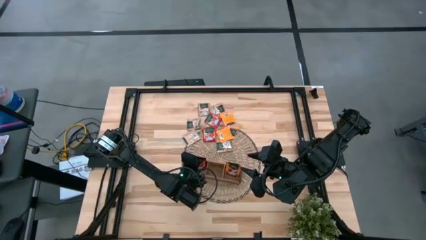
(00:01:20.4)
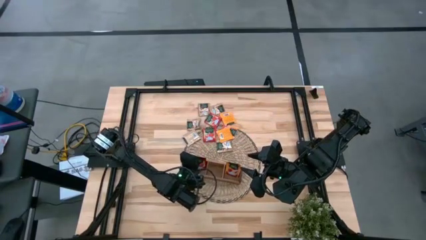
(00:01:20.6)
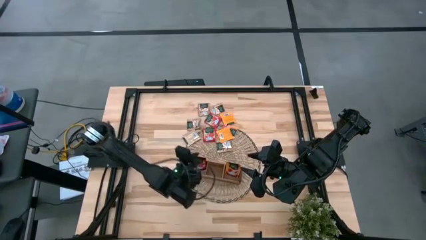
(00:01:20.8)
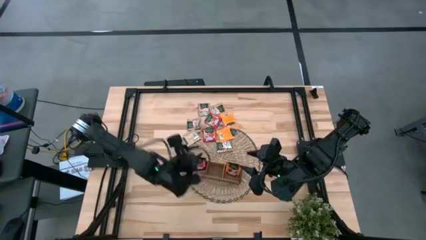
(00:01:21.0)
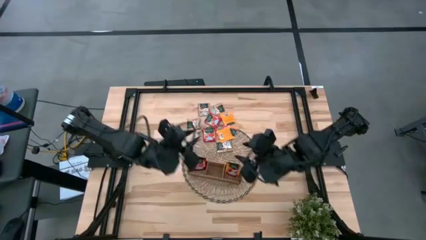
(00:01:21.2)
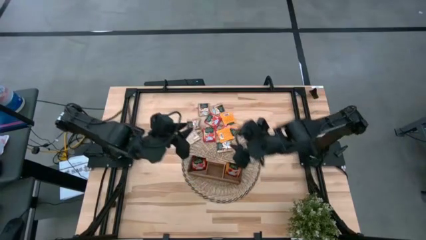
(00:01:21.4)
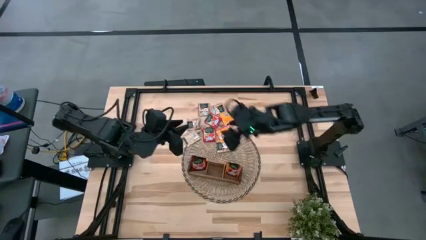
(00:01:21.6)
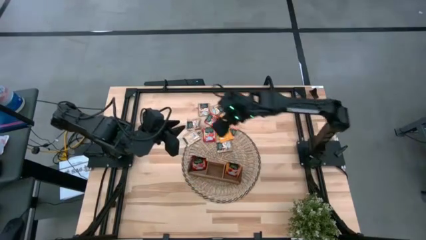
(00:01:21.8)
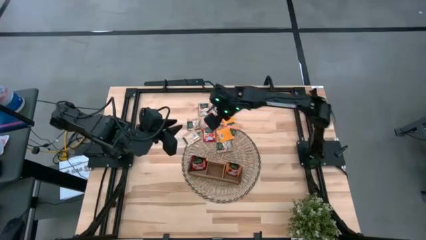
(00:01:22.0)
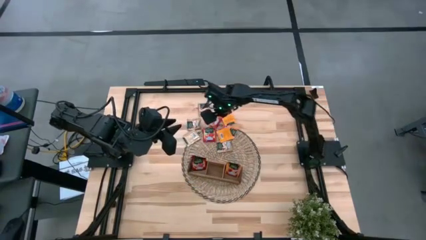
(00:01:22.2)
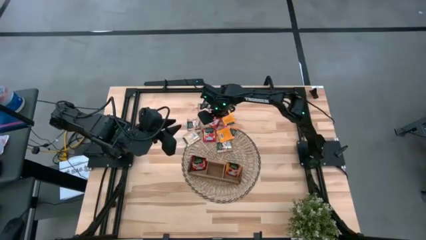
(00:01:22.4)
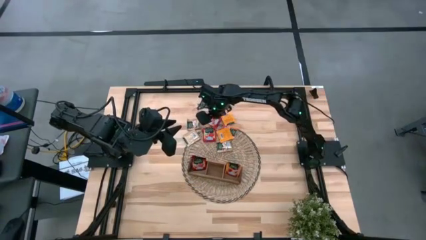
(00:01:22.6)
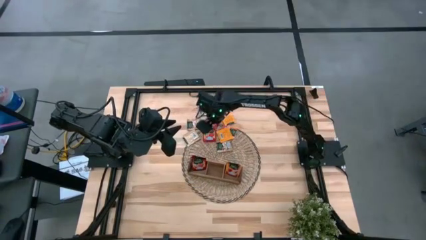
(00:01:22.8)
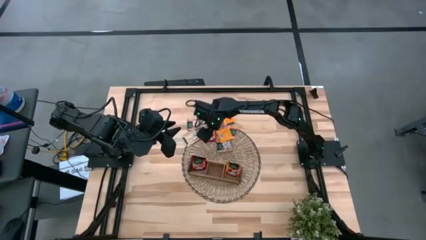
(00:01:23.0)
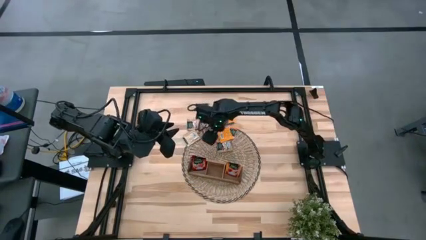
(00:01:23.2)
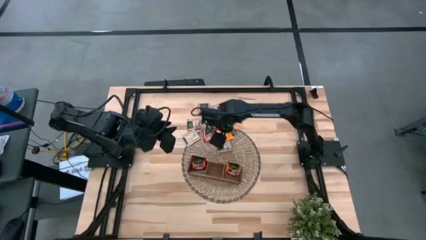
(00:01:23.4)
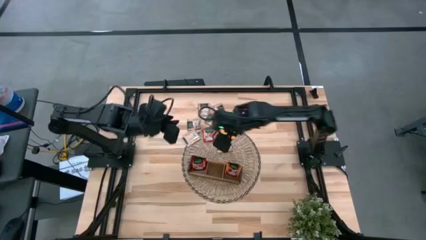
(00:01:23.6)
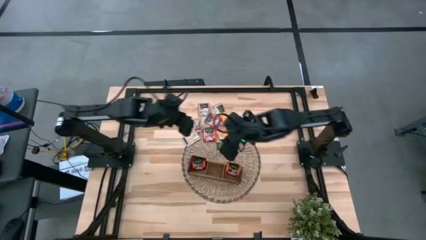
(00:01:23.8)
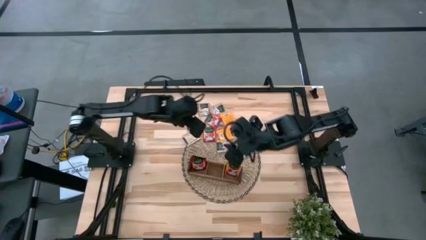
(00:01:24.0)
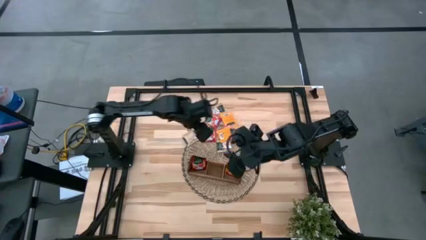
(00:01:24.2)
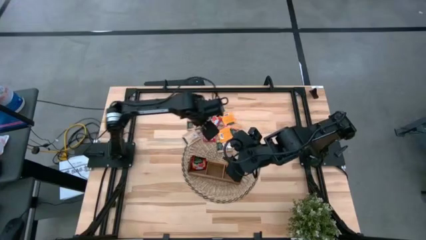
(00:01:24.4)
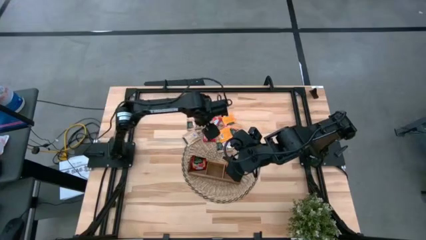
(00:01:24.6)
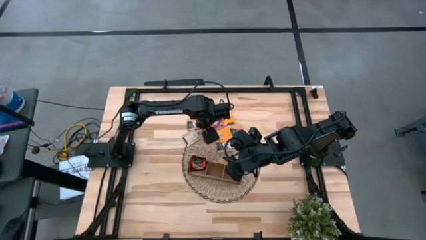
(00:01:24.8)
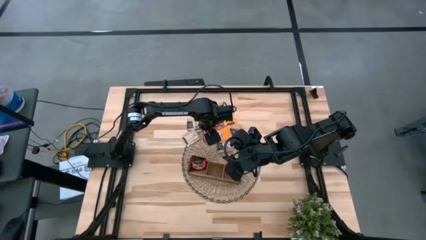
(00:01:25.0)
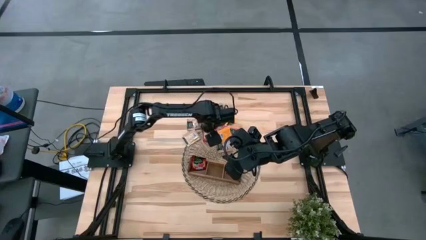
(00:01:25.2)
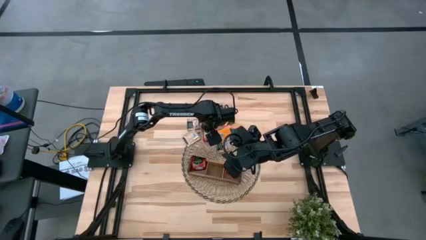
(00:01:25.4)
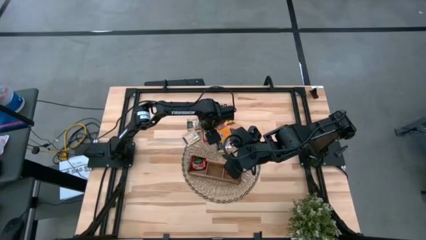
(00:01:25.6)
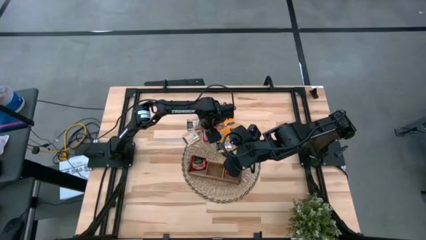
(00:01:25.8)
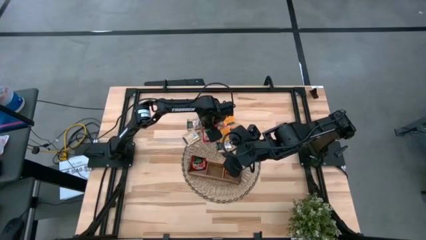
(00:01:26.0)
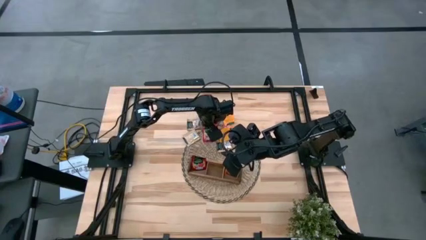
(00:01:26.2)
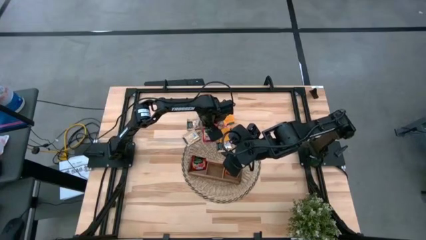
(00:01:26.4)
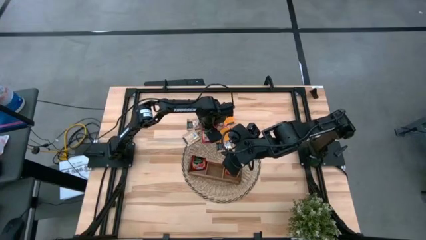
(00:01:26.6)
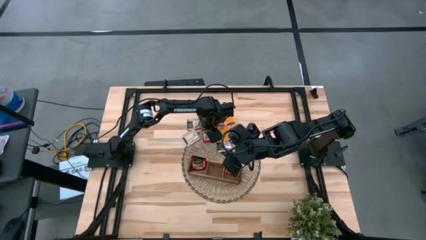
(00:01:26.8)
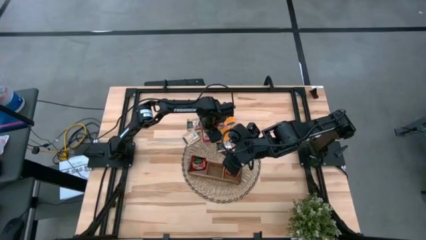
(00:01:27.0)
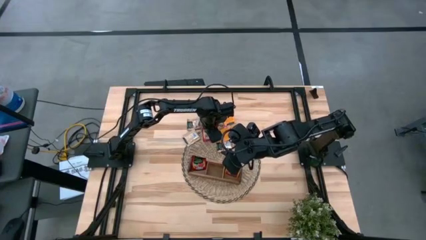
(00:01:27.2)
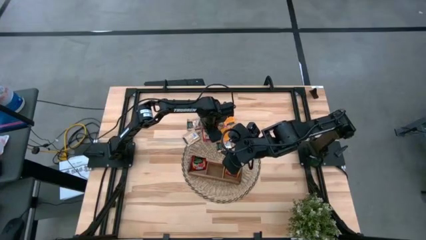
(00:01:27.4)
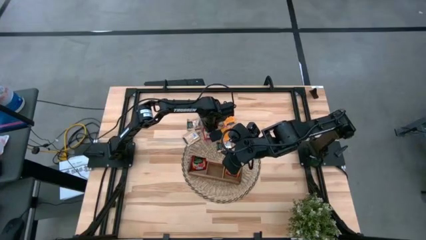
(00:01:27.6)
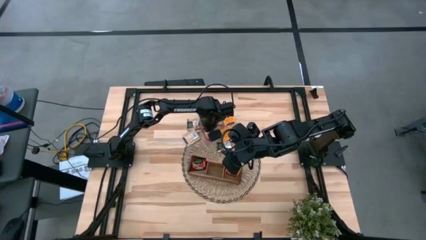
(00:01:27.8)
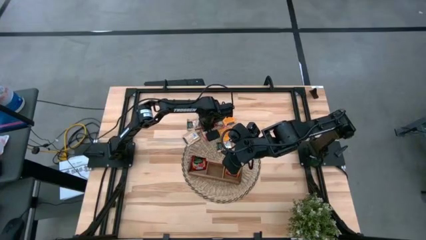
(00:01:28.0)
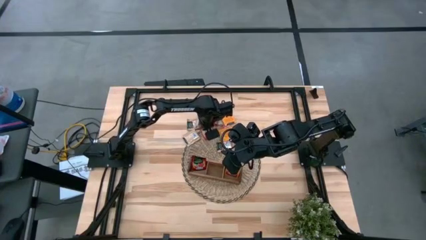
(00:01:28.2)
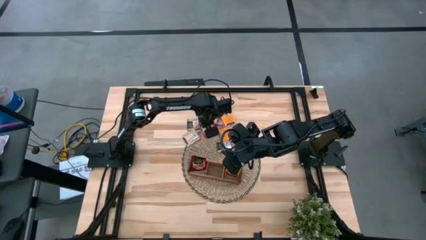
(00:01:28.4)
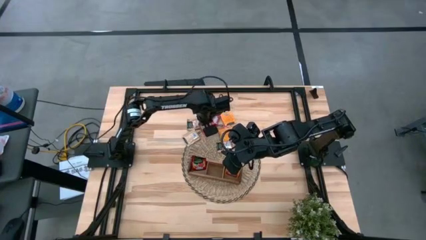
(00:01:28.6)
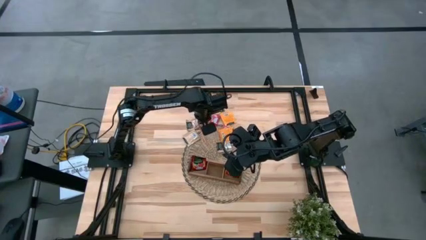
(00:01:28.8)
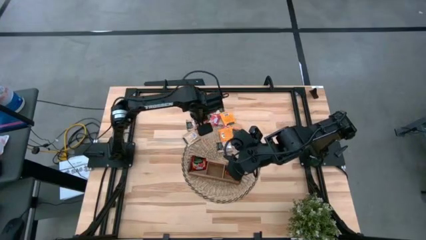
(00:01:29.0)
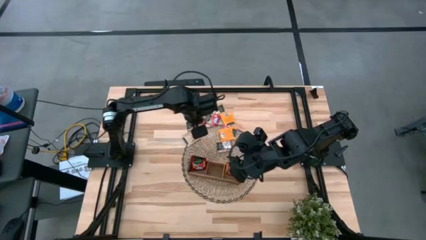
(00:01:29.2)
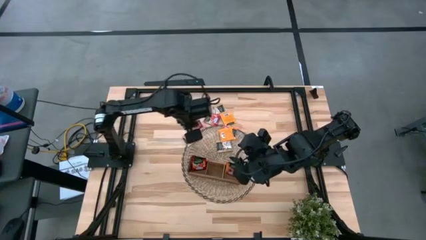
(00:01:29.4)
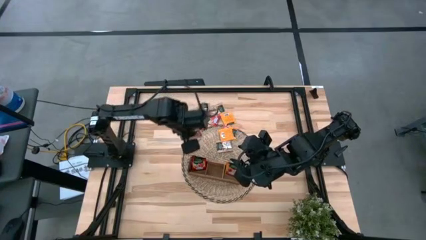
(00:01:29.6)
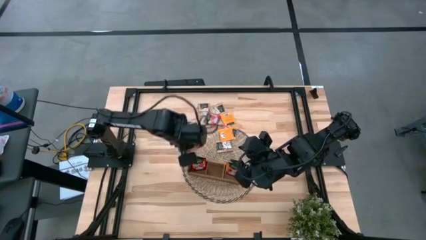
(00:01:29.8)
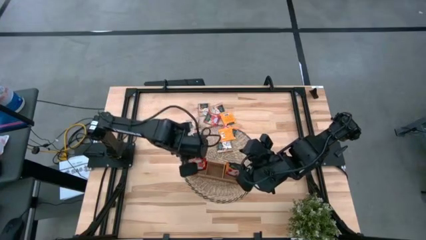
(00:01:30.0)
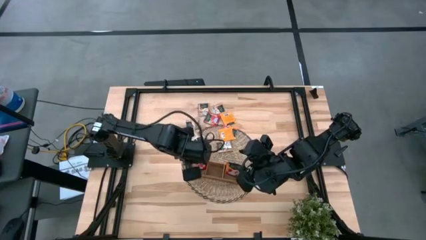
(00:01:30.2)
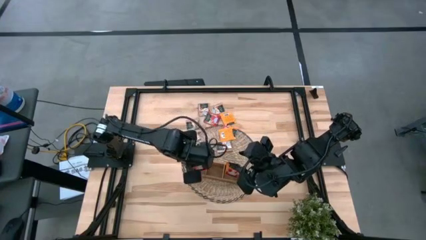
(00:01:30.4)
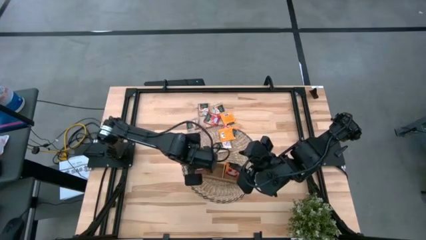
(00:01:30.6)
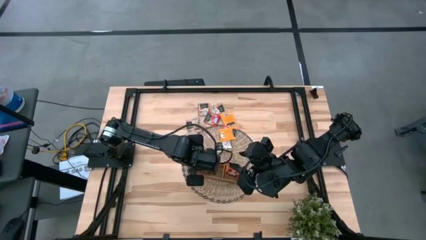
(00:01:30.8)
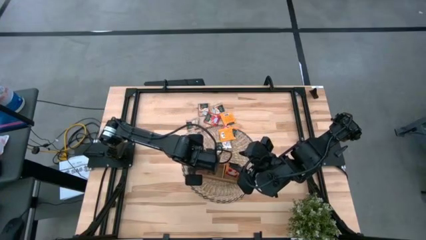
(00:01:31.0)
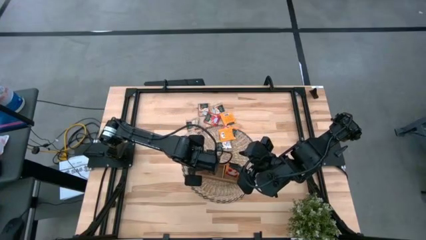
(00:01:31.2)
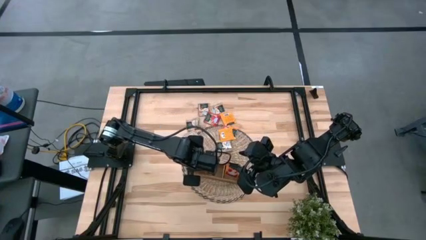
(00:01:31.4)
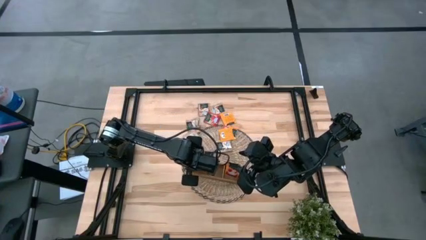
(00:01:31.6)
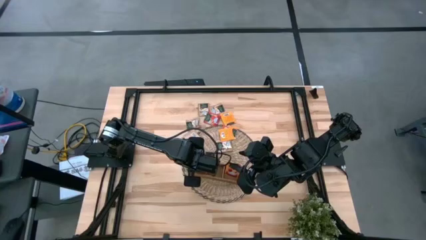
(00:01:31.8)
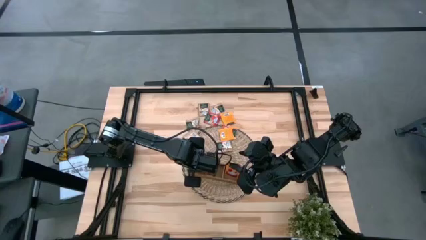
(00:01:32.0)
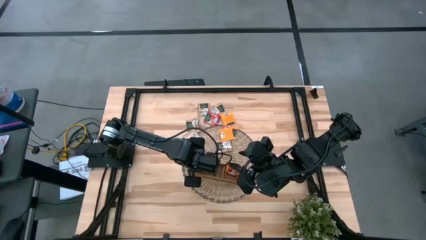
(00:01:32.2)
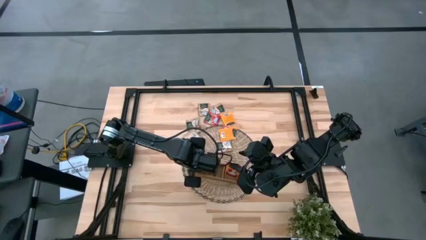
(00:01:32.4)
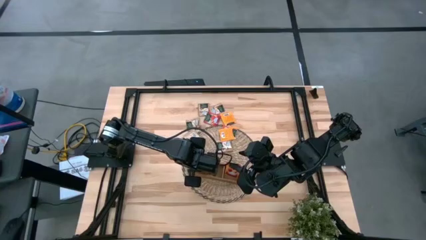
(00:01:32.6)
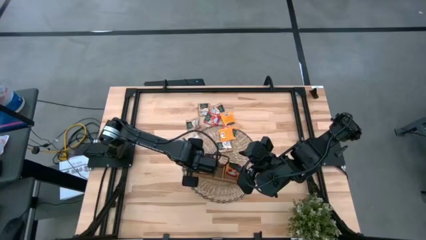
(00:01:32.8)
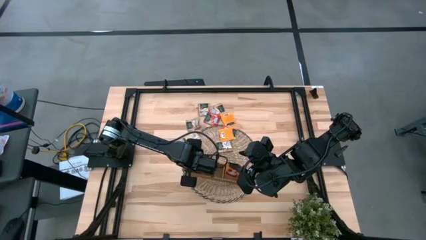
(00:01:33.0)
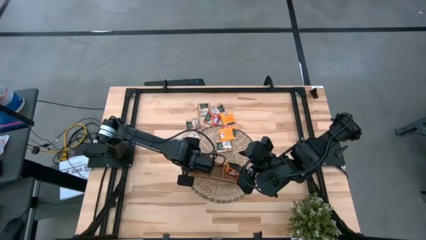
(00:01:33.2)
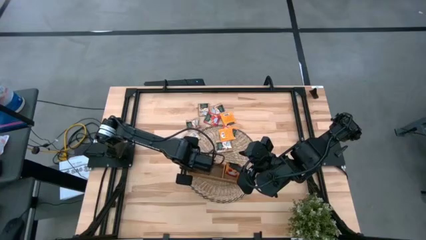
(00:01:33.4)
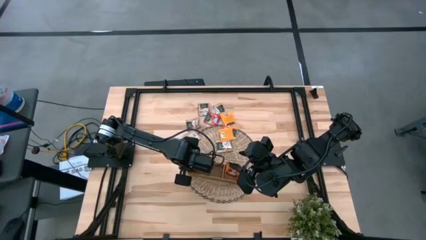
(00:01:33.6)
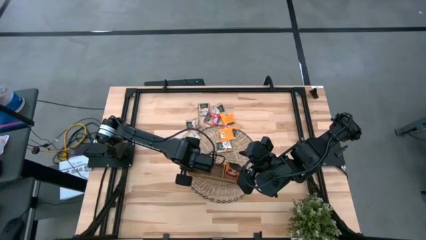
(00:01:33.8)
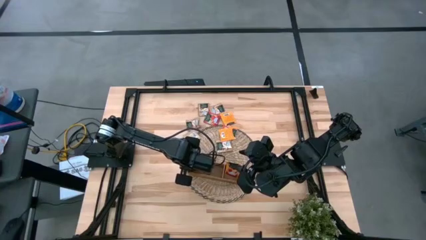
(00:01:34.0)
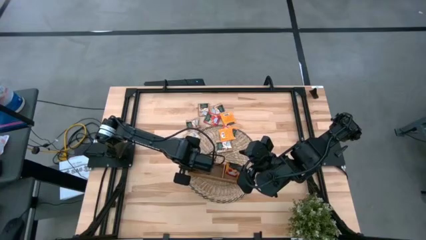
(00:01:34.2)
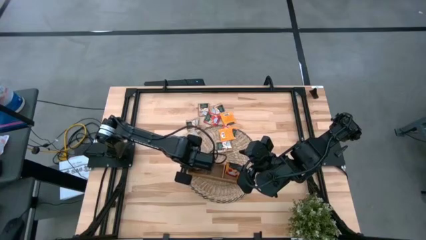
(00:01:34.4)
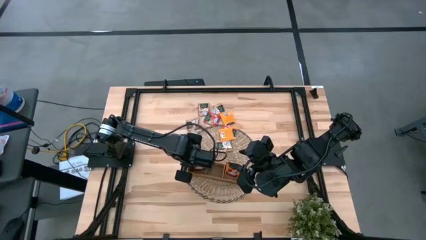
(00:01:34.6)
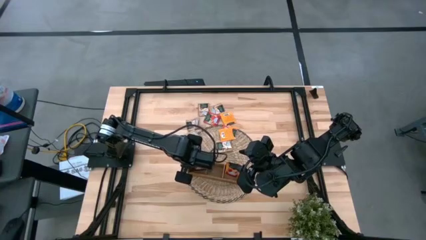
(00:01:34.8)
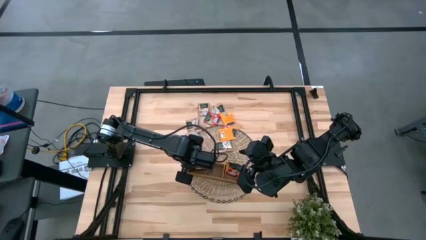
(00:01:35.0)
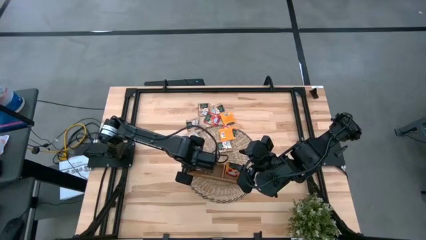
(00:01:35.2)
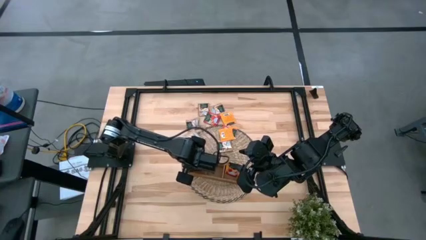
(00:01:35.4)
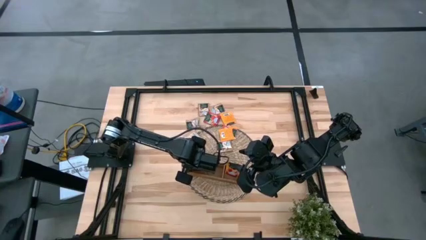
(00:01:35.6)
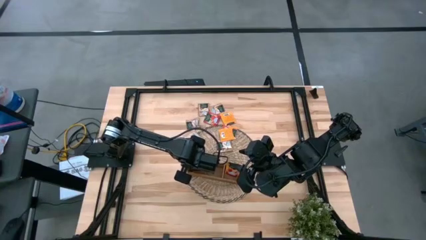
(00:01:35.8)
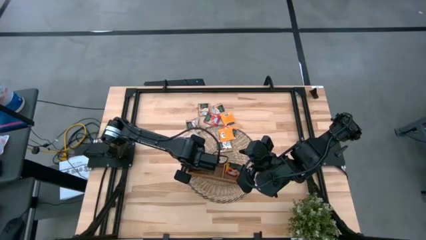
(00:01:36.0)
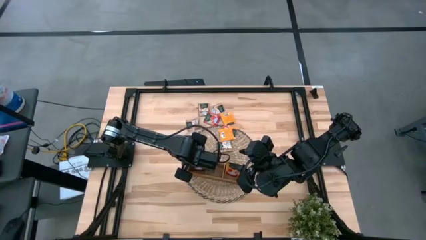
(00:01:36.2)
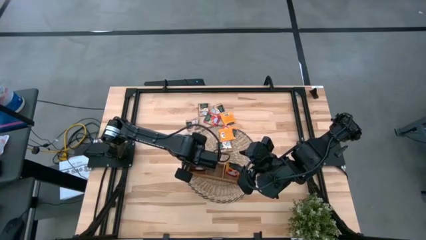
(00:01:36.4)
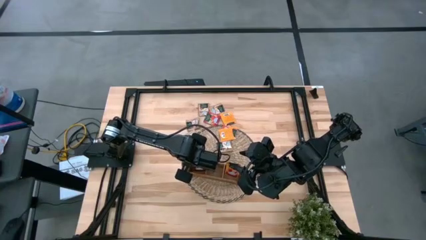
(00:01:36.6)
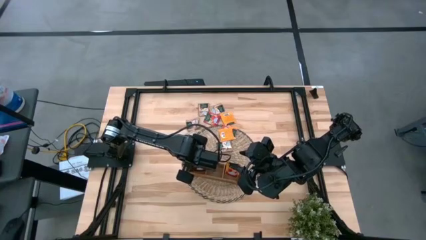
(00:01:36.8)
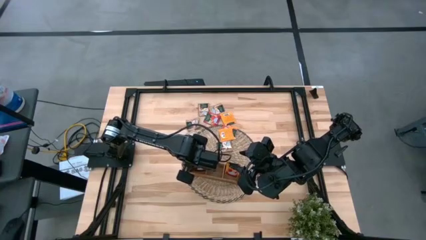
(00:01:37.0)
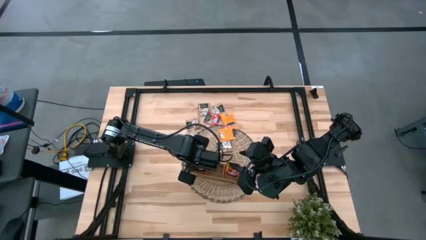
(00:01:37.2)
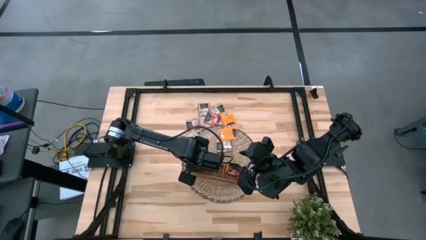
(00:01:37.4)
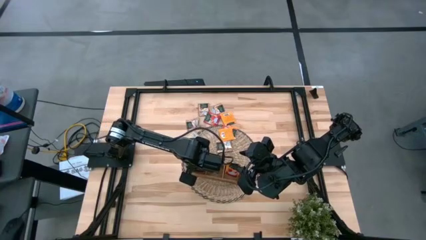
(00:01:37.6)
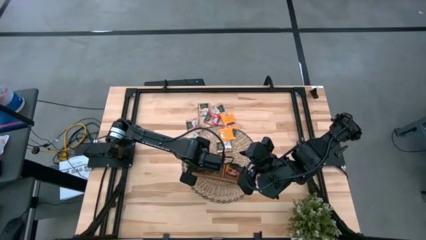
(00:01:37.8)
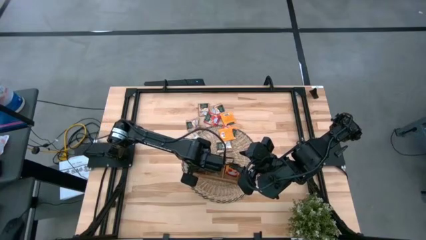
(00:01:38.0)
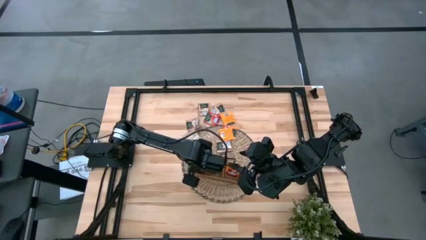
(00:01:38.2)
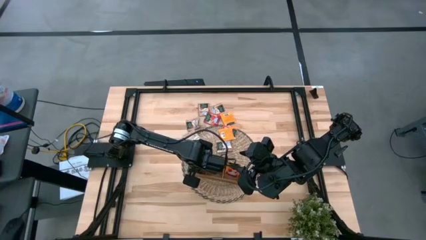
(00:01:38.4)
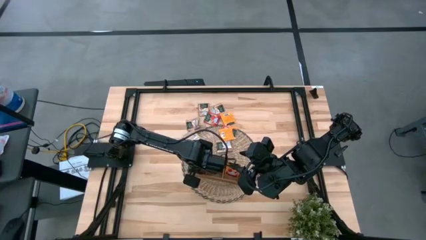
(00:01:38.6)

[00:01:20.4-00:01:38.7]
Task: Pick & Place Tea
Put the red tea bag into the left section of the wooden organizer
